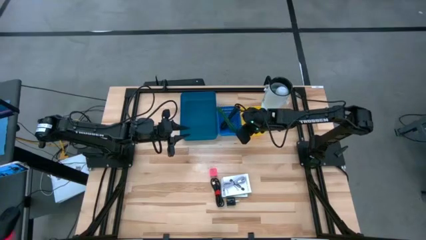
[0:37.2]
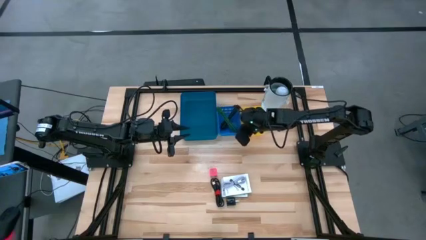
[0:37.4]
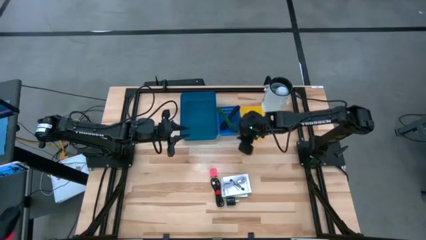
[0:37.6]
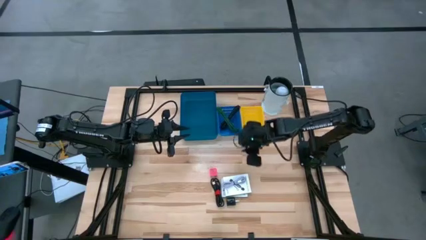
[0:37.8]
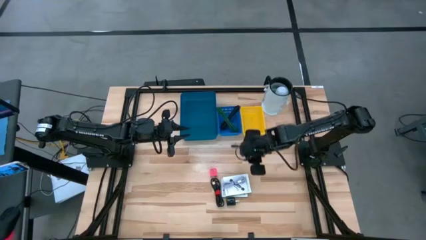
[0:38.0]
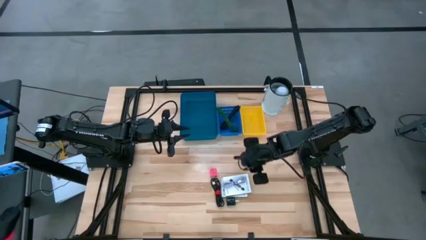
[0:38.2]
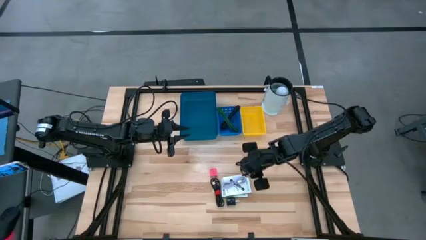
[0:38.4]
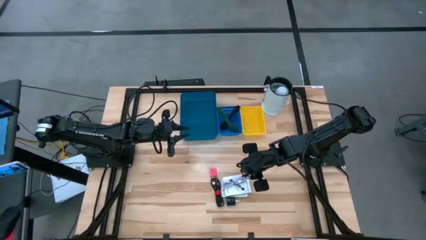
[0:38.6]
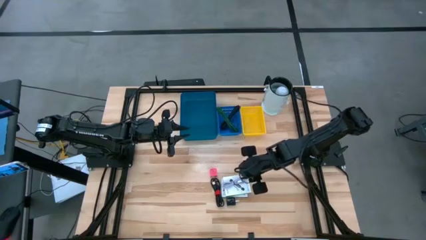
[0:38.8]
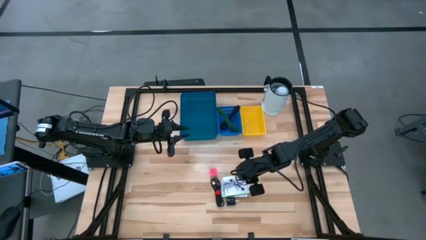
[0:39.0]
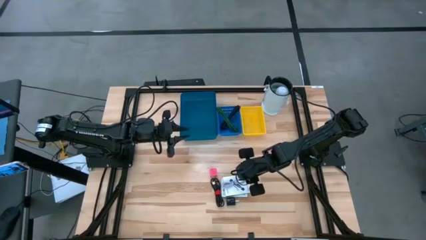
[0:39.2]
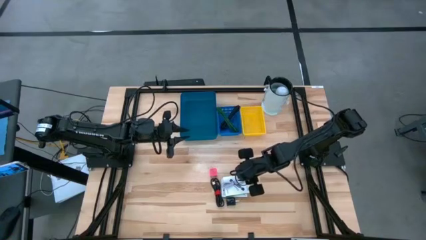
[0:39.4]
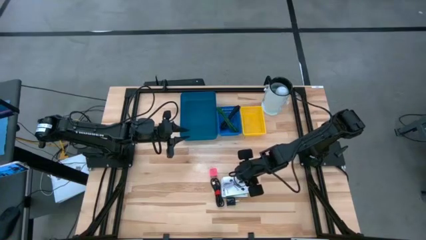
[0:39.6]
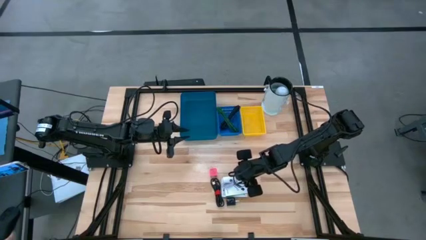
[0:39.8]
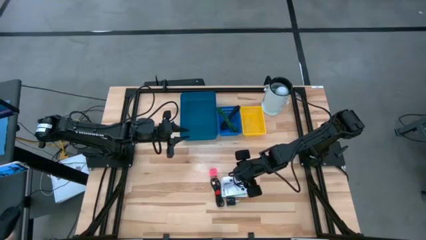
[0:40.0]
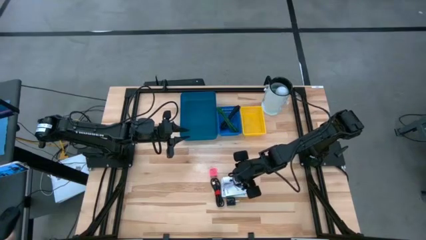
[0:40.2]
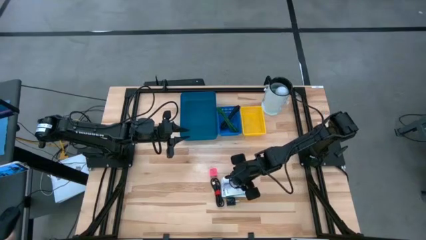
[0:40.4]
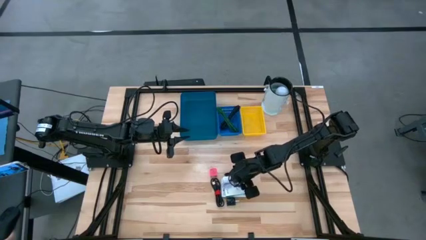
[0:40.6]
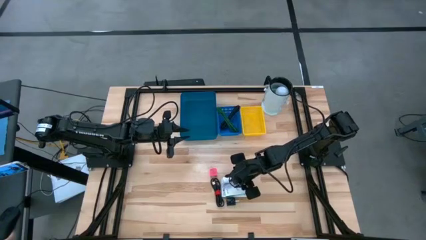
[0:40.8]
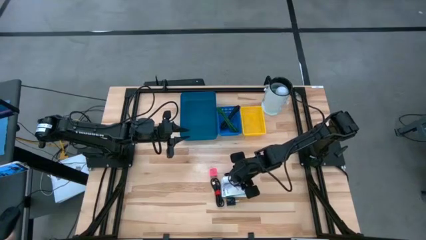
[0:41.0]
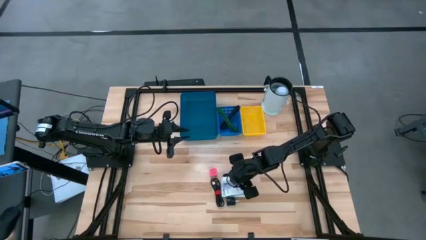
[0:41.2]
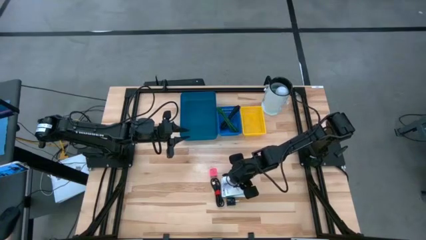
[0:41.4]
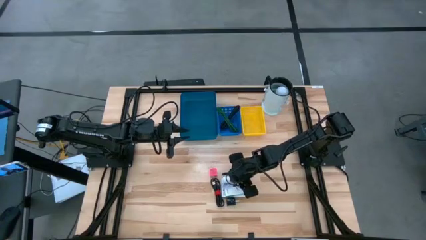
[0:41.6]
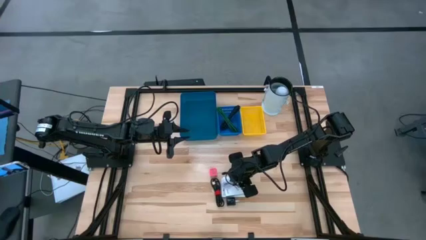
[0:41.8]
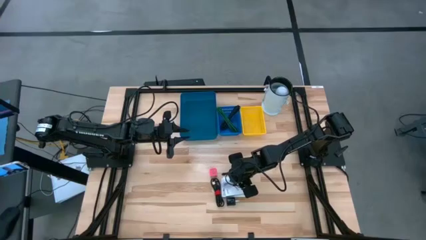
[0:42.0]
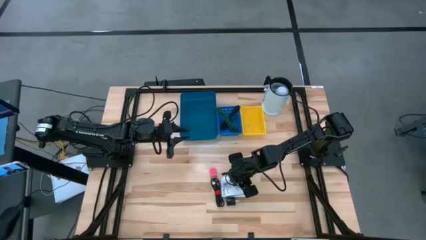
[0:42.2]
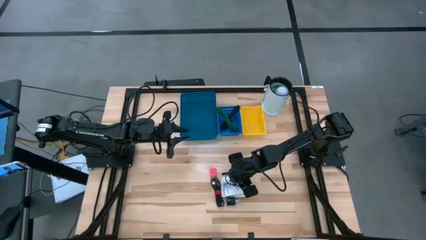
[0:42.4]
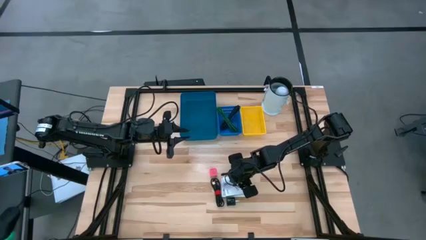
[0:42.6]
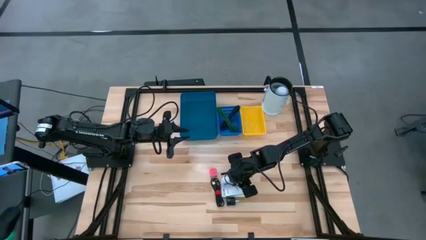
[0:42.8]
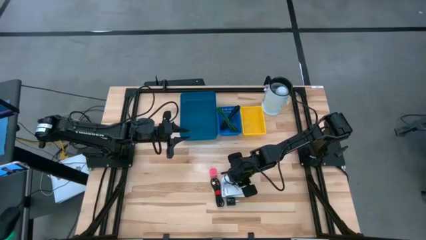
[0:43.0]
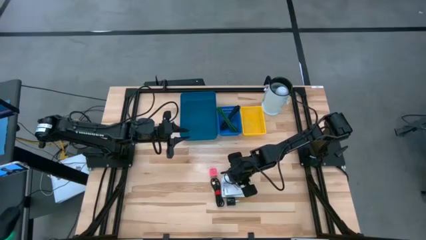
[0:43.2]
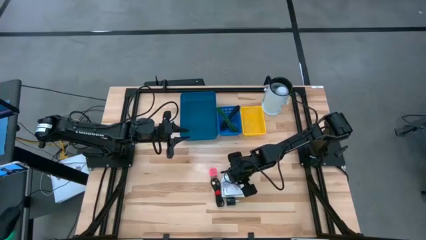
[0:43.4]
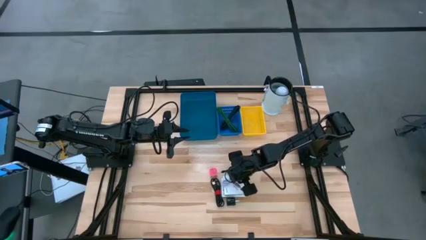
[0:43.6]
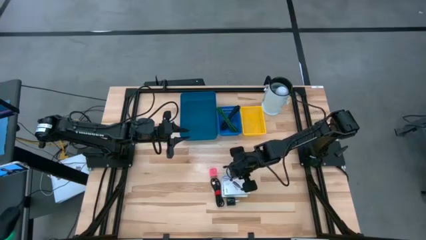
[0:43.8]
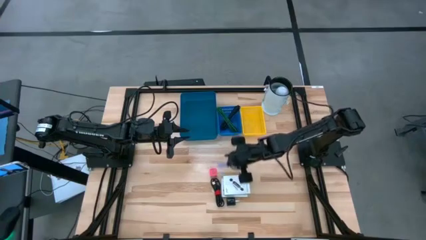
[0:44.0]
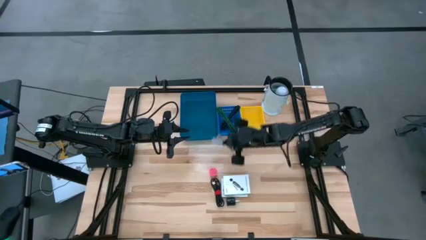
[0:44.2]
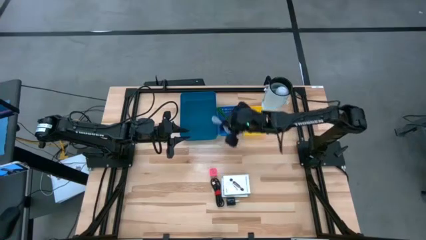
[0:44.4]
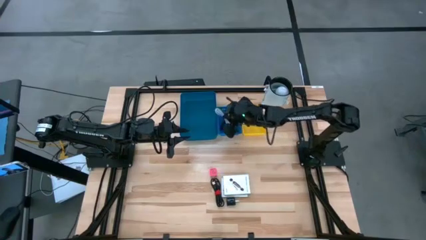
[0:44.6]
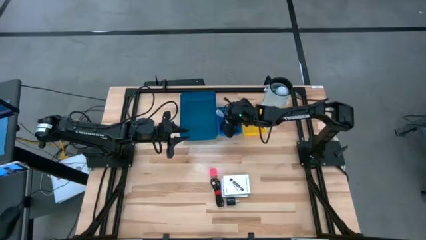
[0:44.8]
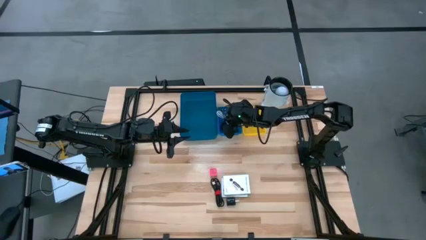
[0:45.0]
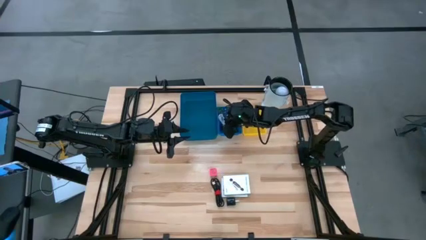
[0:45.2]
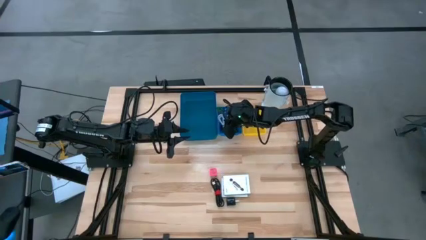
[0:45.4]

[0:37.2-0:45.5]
Task: Pick and place items into bin
Put the white charger cable into the blue basket

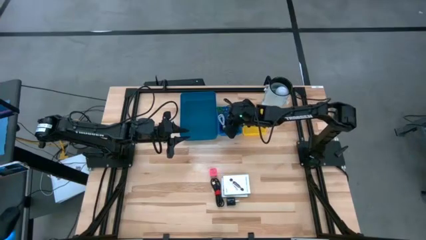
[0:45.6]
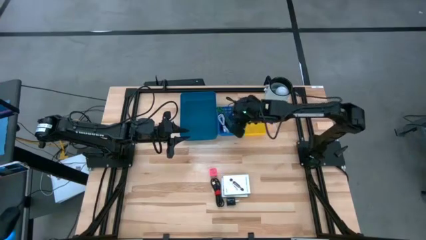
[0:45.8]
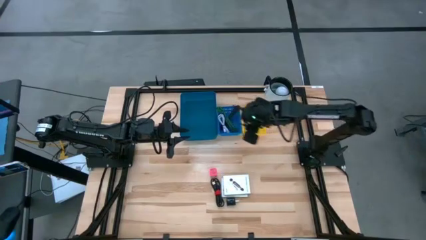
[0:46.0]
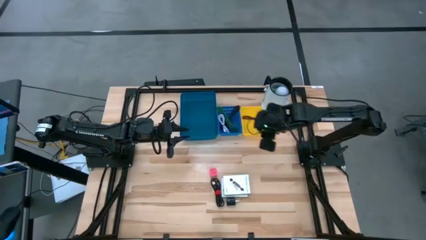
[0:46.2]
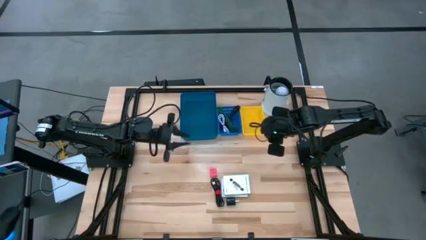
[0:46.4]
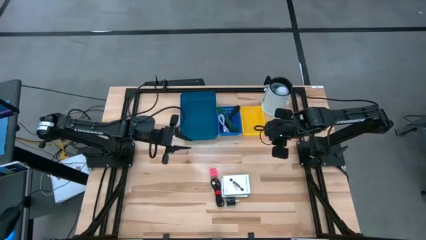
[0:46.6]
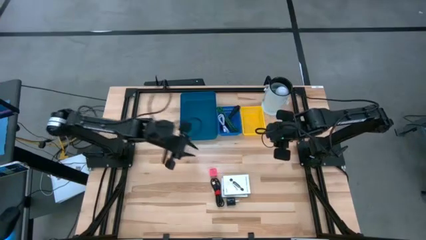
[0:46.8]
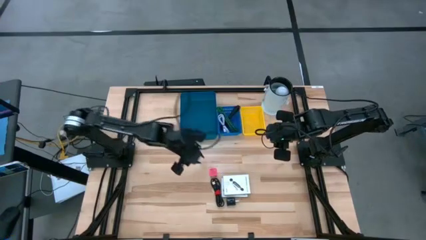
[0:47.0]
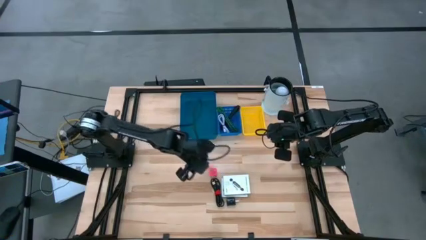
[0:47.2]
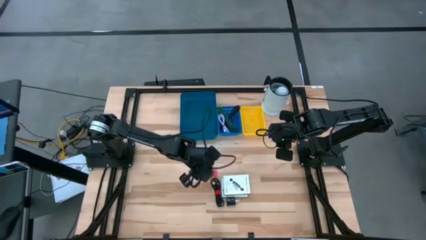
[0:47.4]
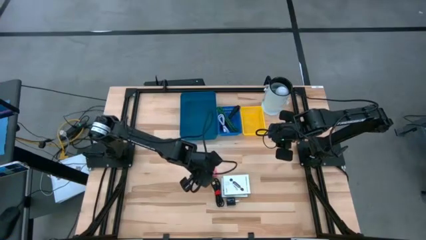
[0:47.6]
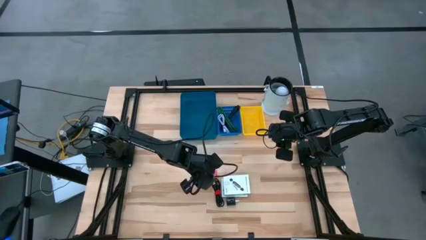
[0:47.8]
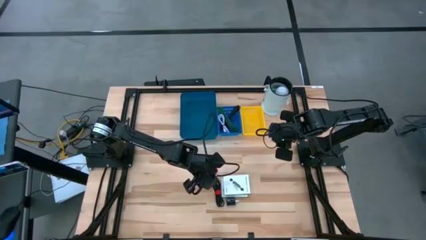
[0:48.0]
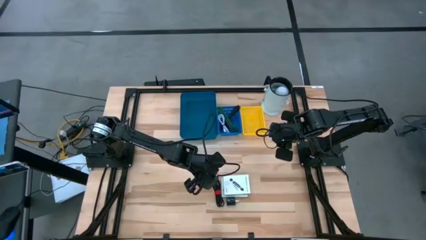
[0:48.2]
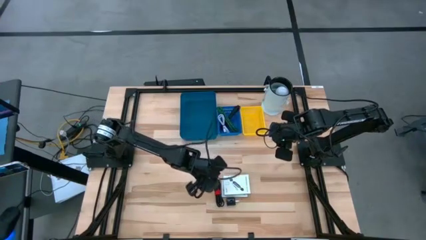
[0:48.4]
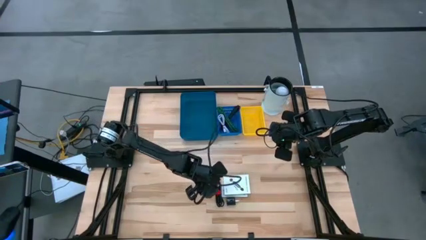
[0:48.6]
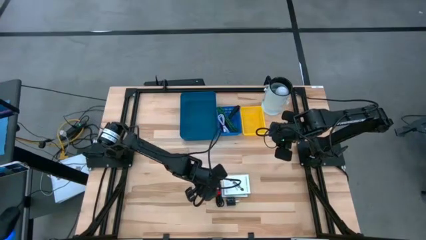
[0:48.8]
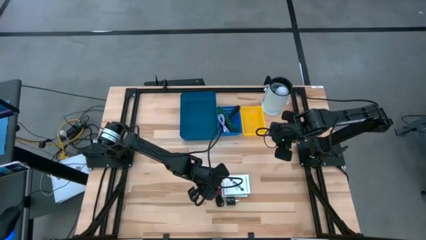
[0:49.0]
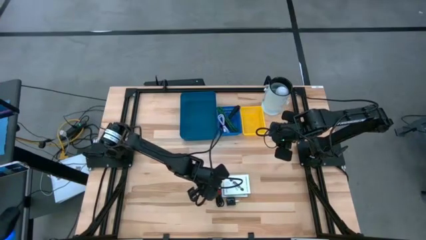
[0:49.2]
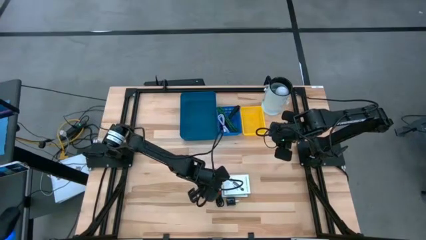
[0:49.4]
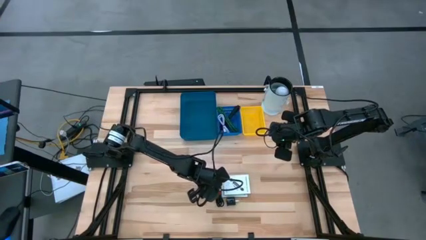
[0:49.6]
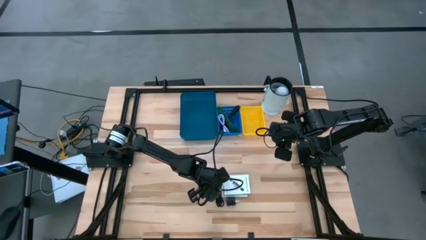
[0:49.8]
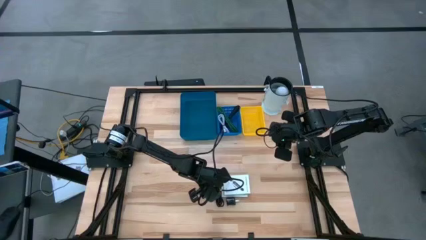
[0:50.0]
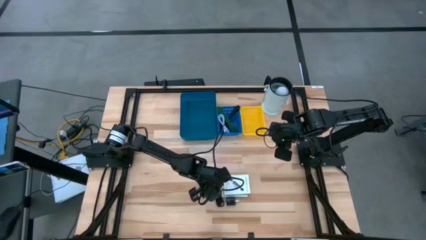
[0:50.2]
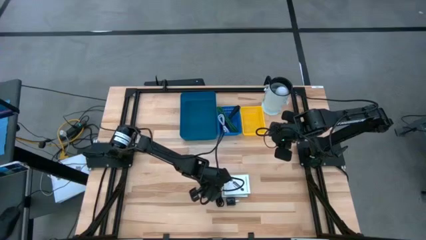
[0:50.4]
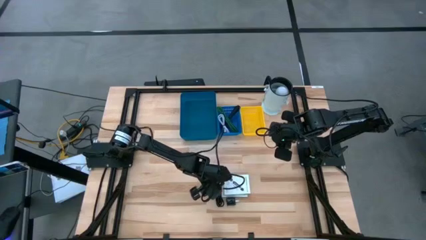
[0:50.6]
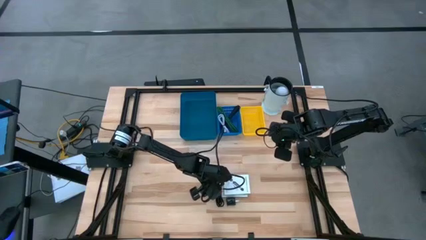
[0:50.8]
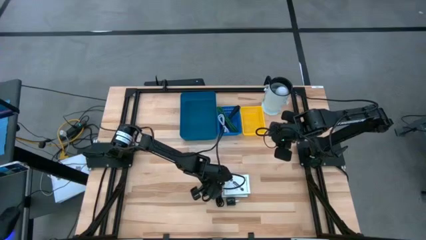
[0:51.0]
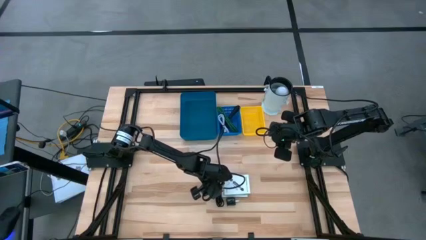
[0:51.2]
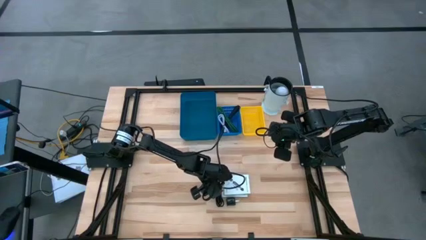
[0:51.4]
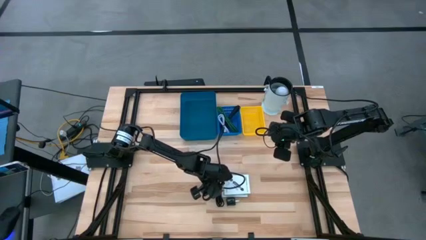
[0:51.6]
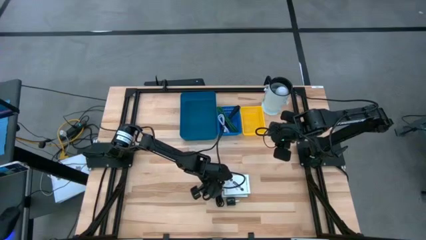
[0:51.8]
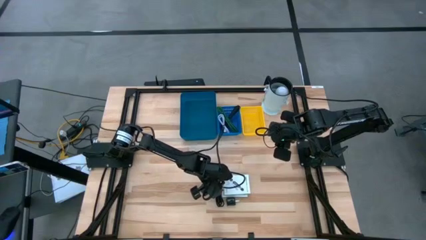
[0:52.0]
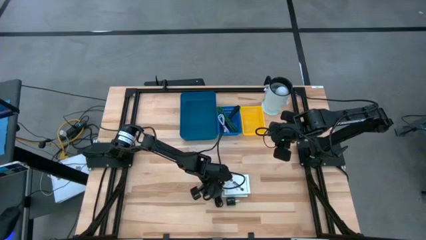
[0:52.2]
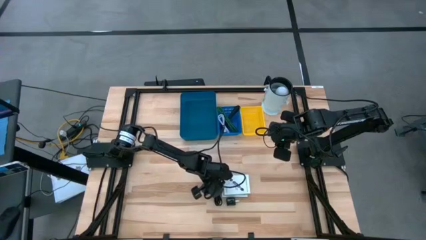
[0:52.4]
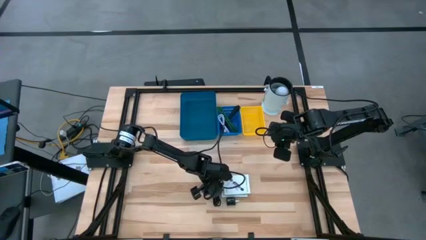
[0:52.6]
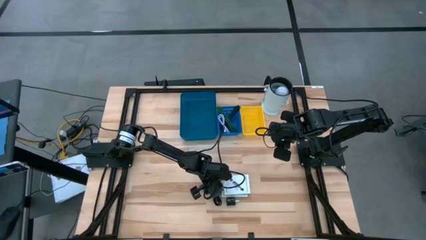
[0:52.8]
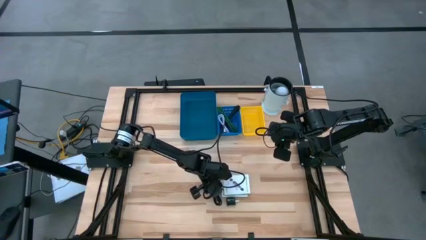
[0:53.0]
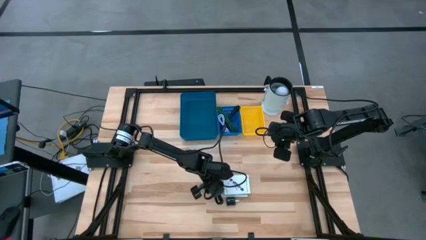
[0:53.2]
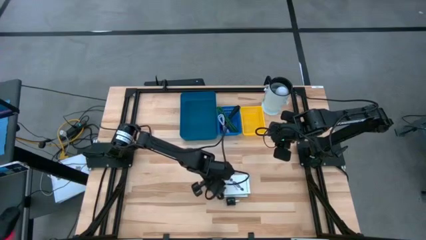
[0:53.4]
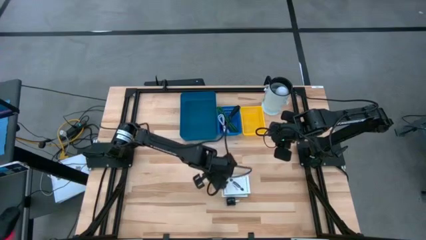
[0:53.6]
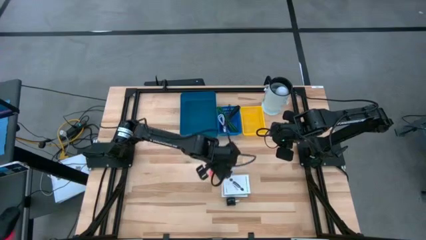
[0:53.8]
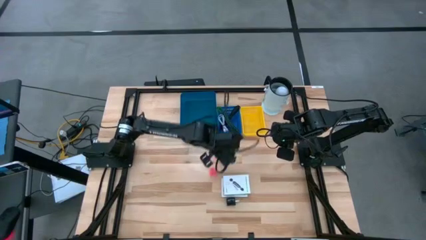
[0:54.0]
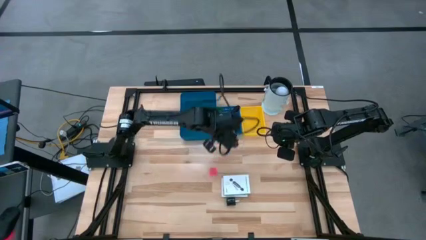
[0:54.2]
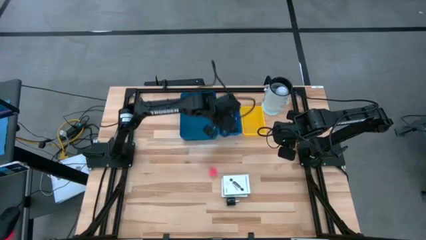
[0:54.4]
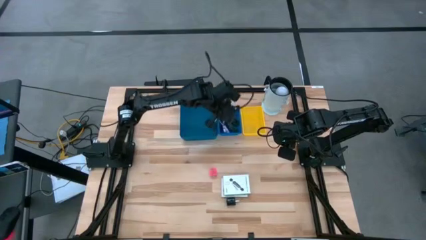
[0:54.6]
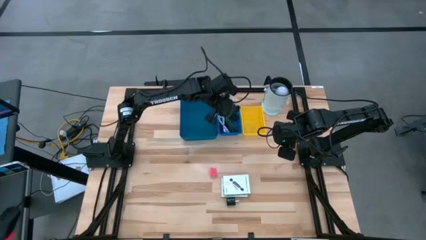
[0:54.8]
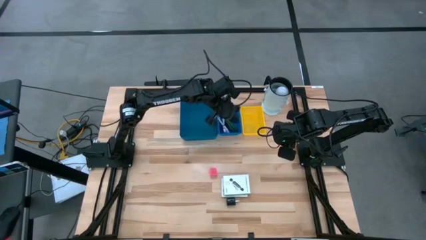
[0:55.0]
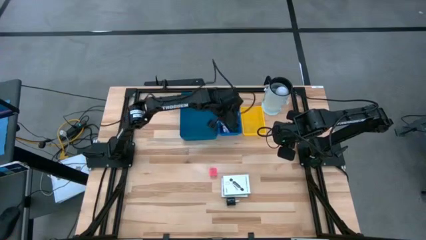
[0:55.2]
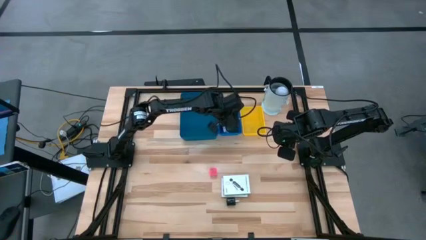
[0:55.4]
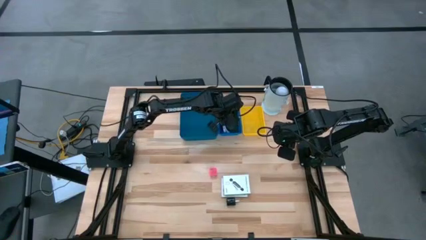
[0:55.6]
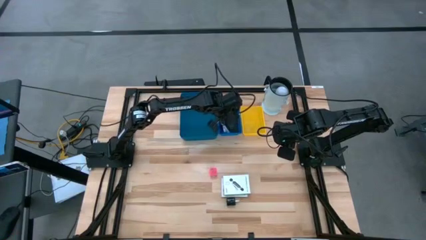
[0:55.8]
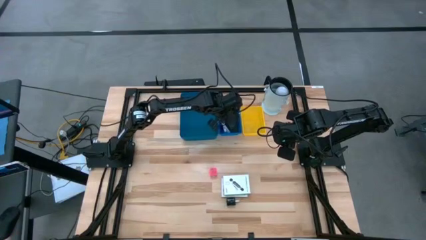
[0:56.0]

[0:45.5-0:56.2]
Put the black charger cable into the blue basket
